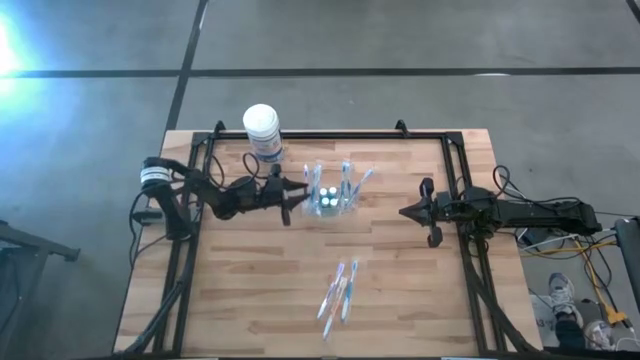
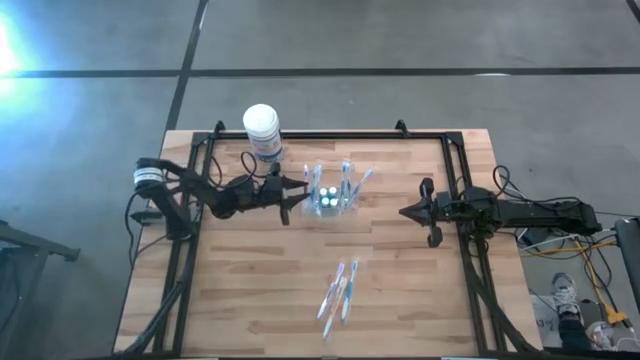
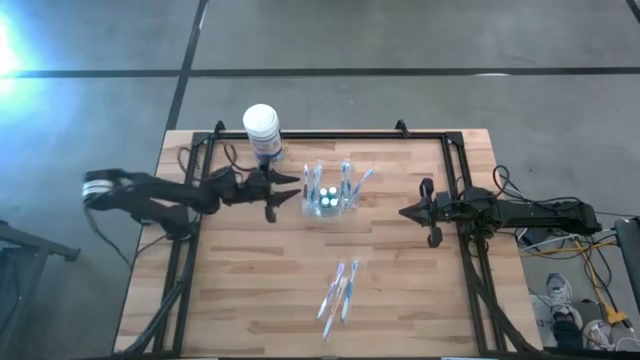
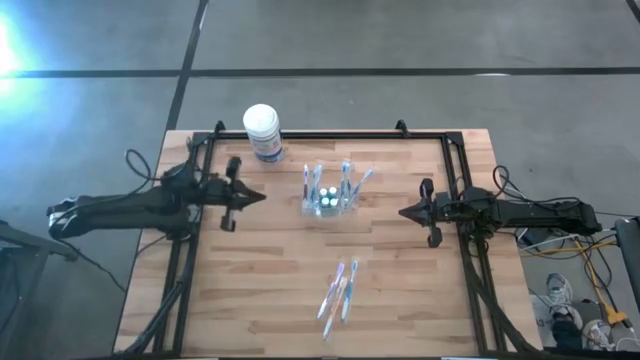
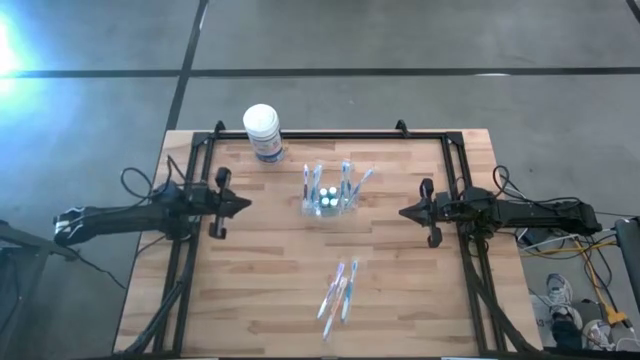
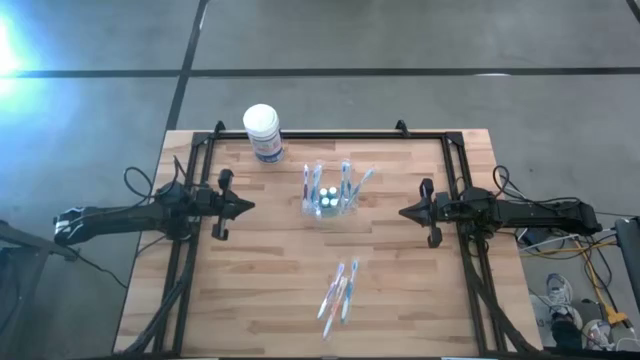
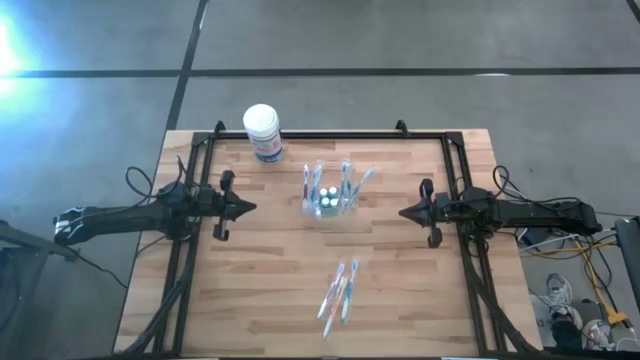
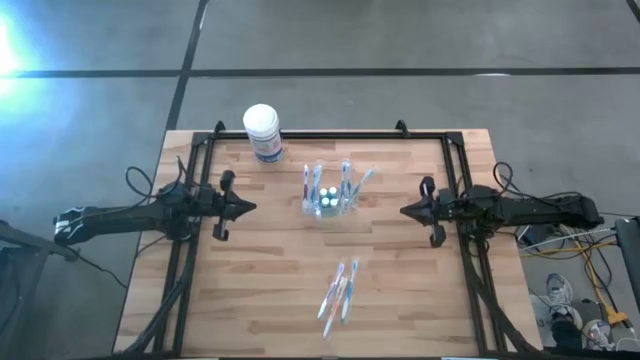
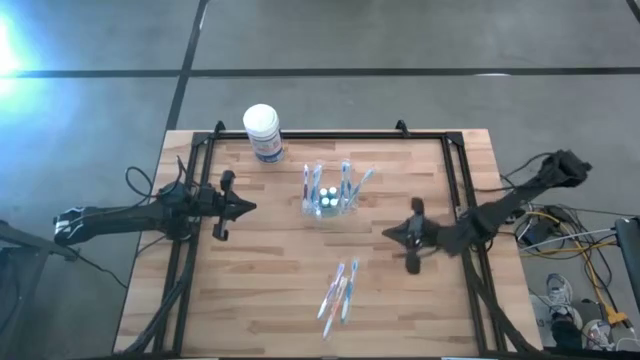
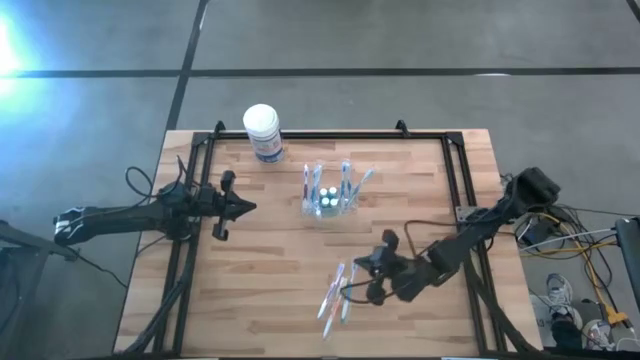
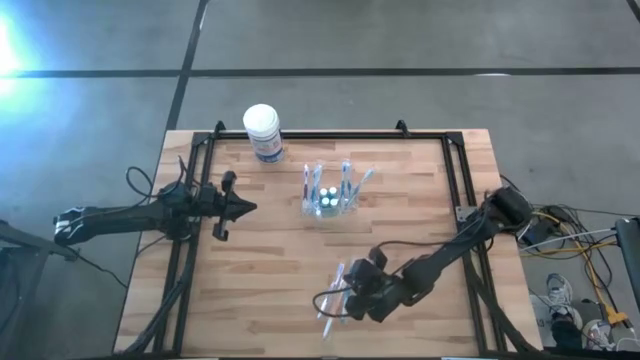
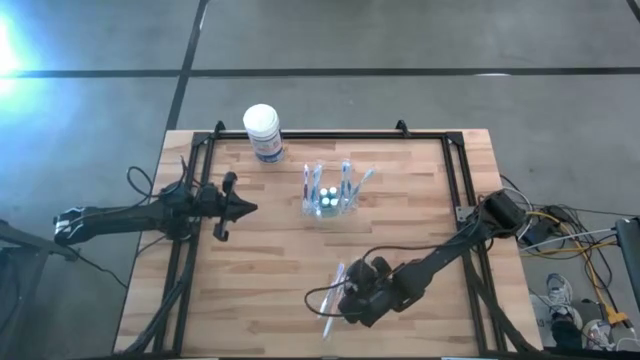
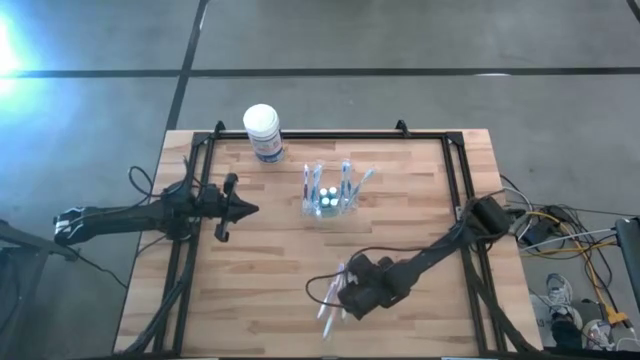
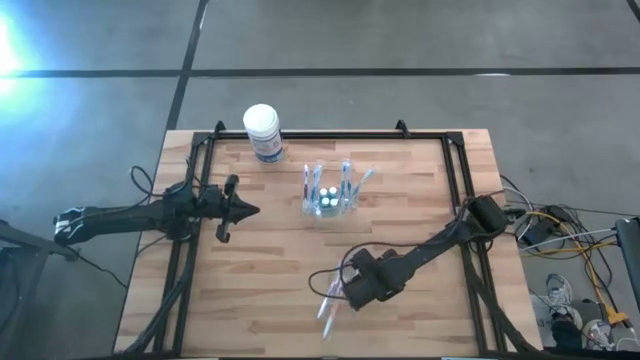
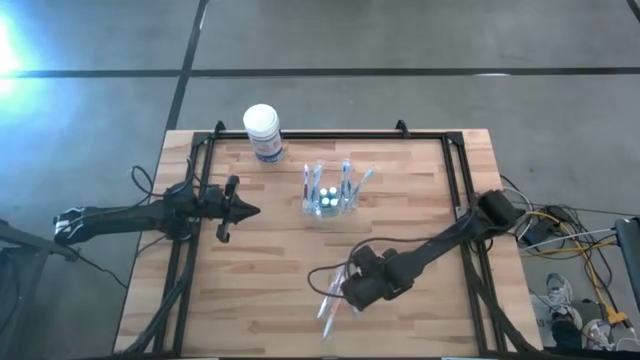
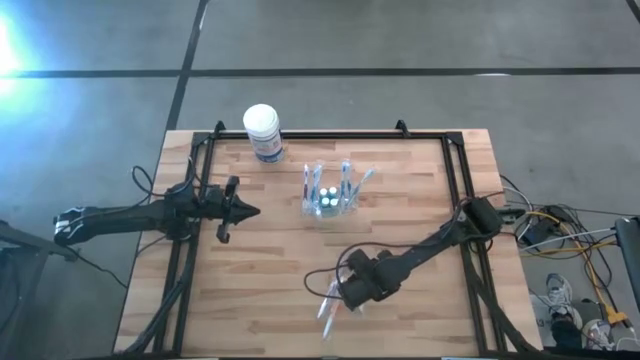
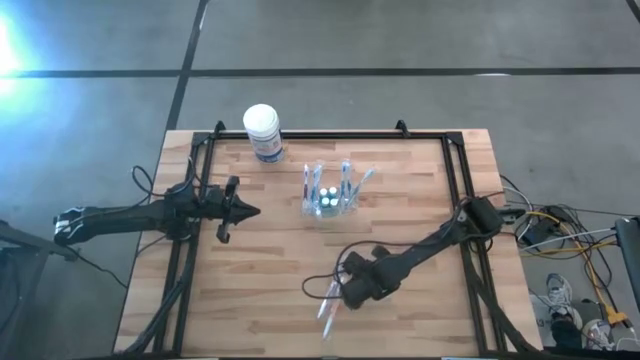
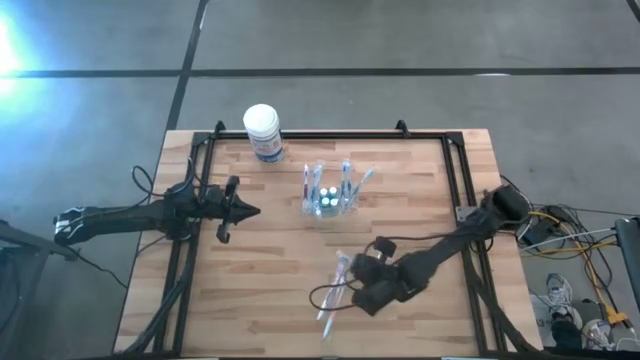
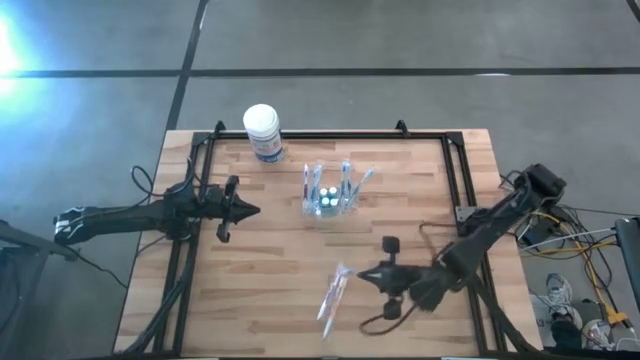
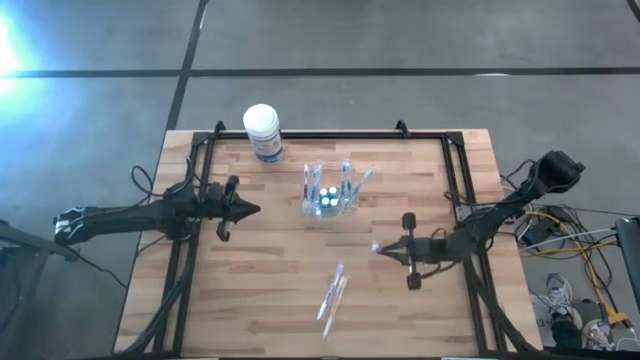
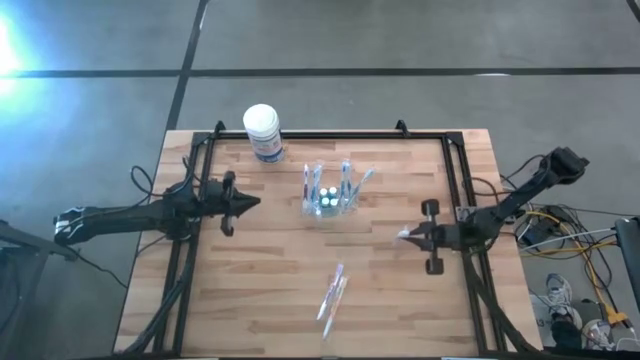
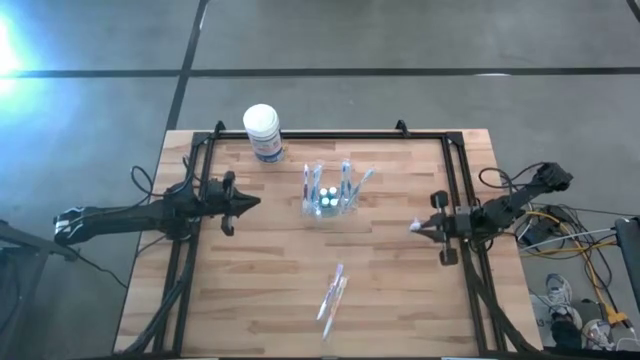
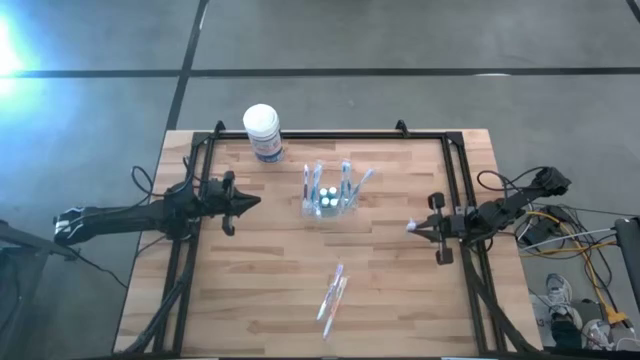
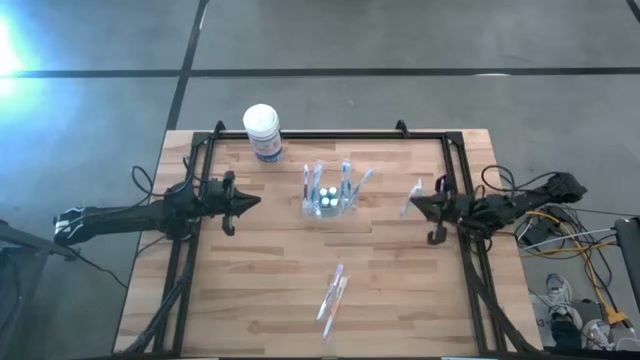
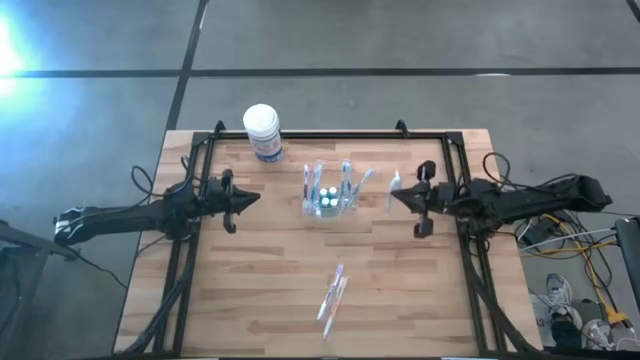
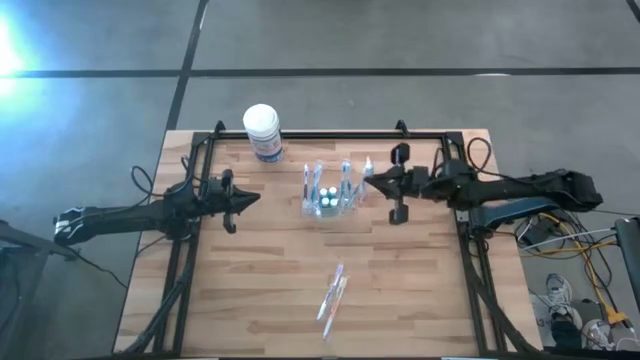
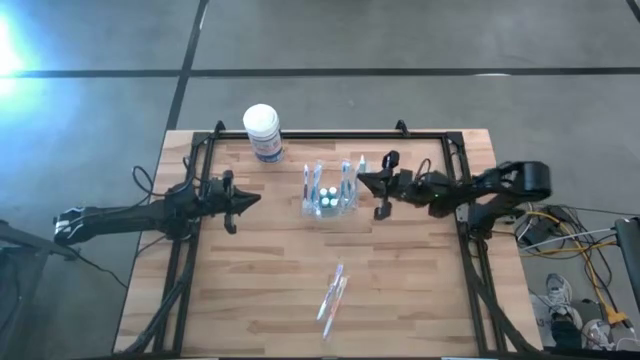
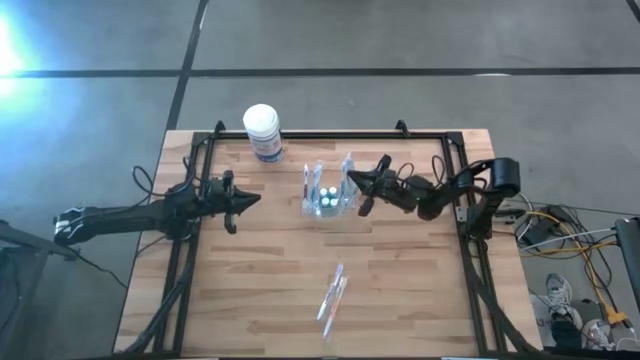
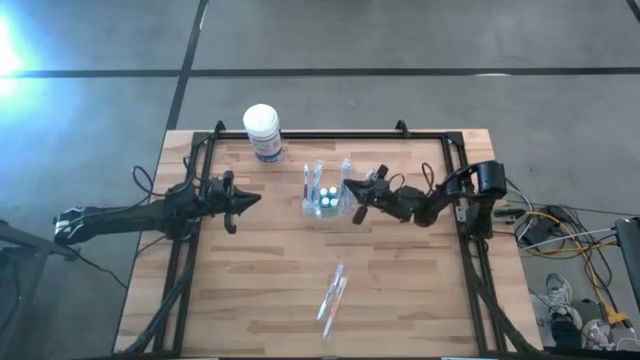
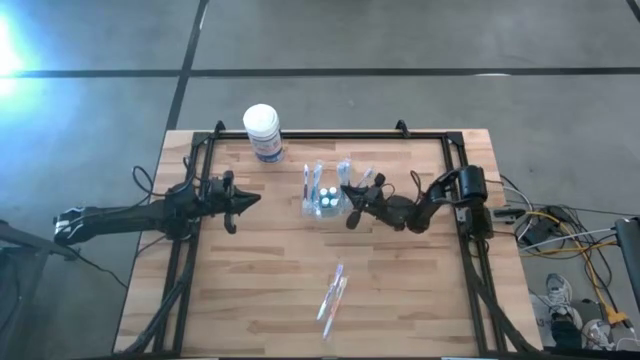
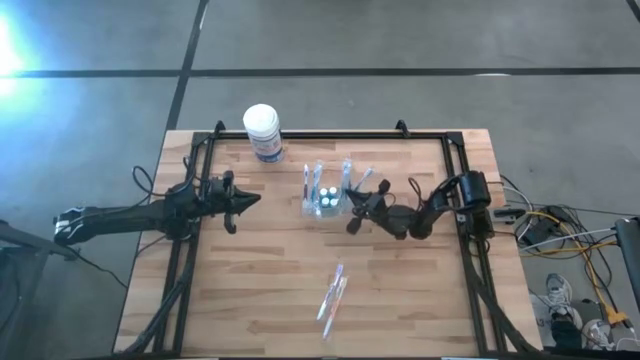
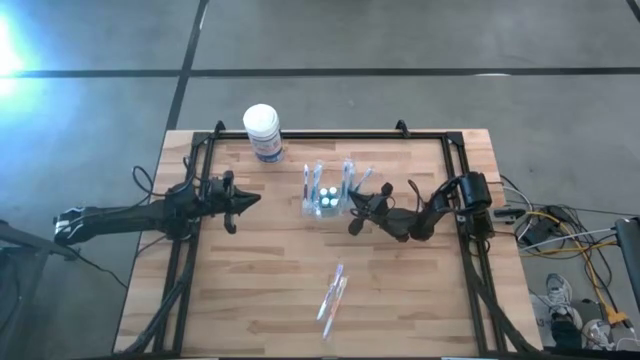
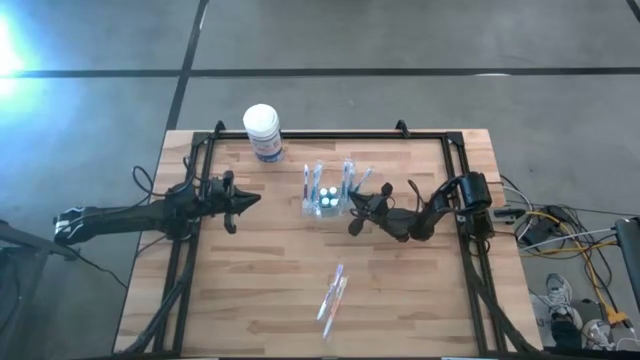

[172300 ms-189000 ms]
Task: Pick & Place toothbrushing station
Put the blue toothbrush into the transparent bin organizer
